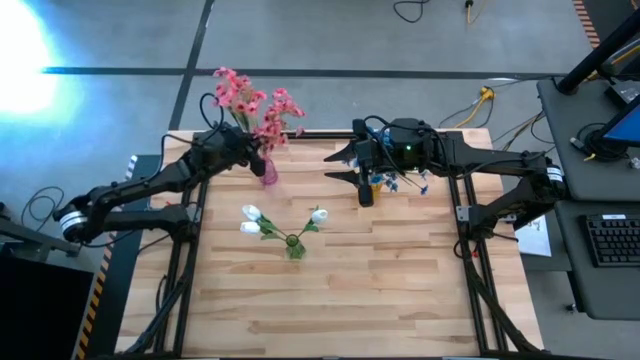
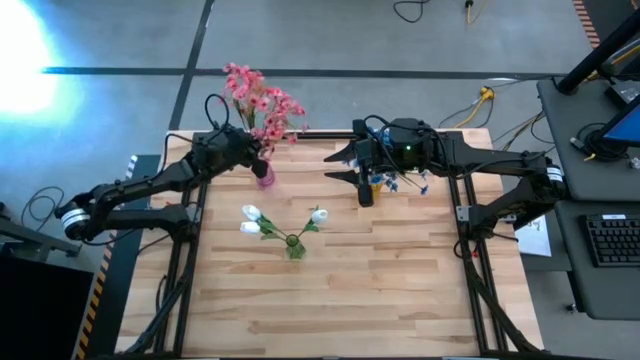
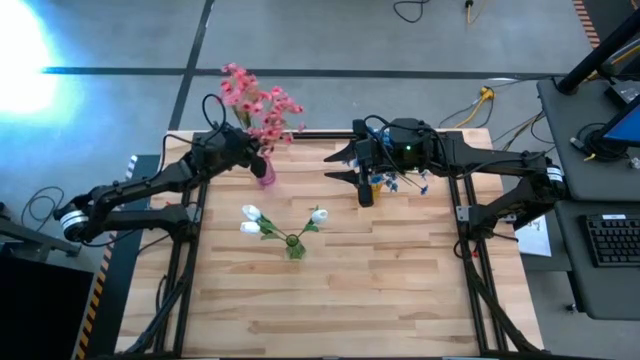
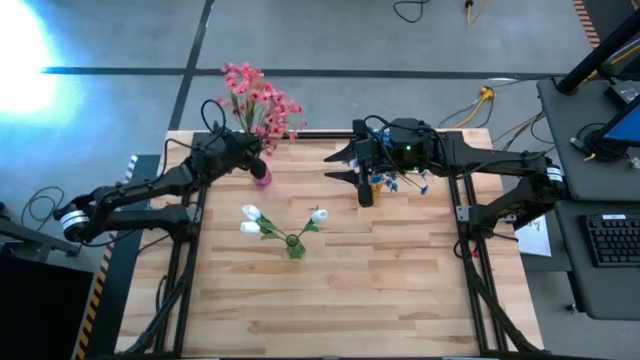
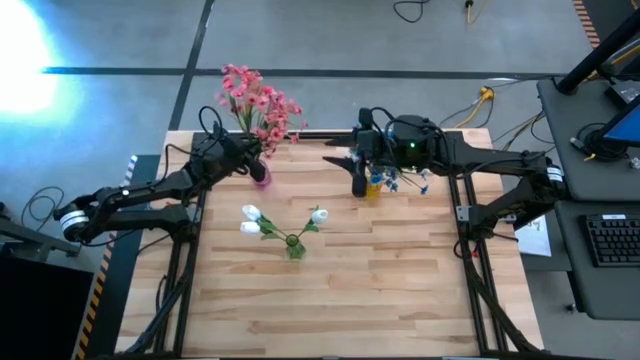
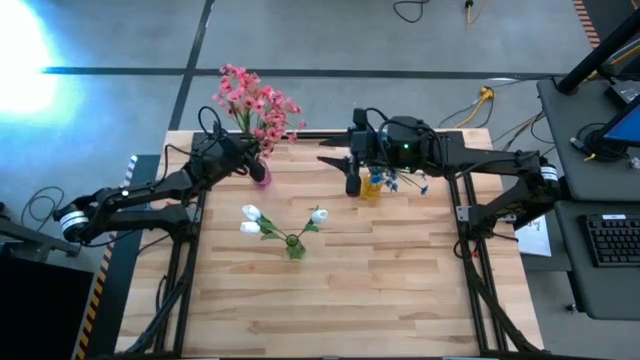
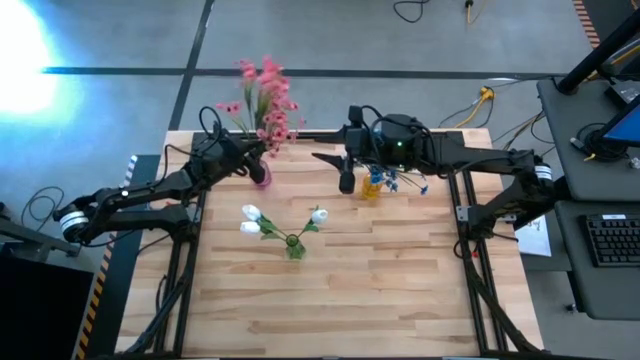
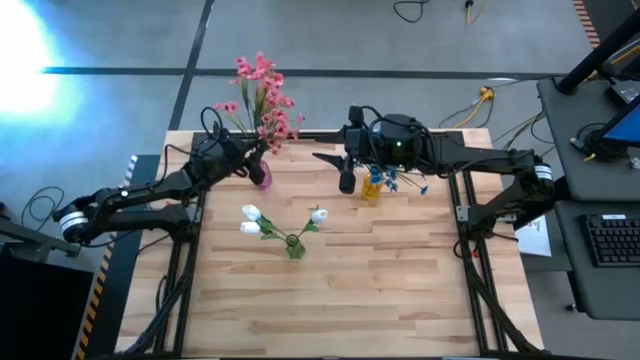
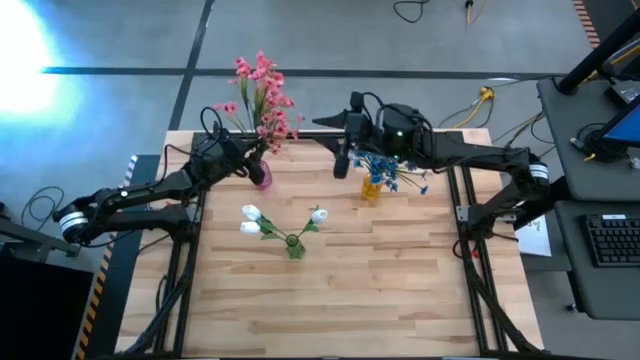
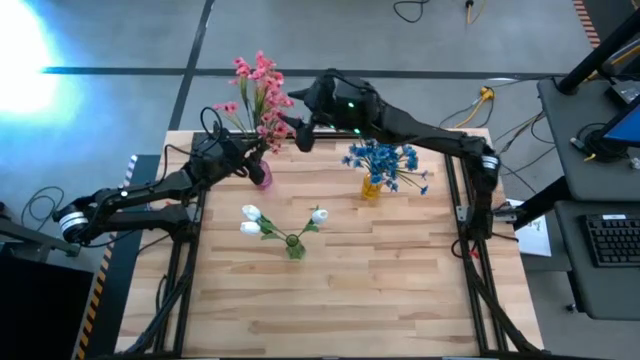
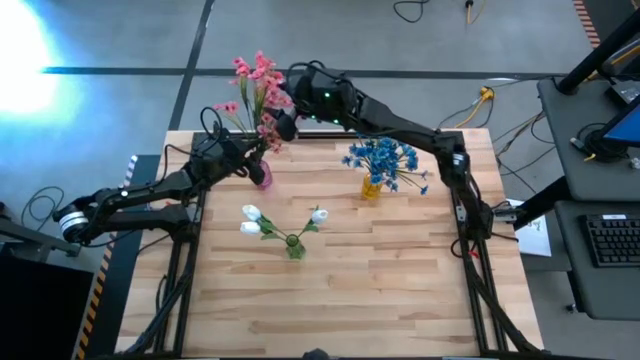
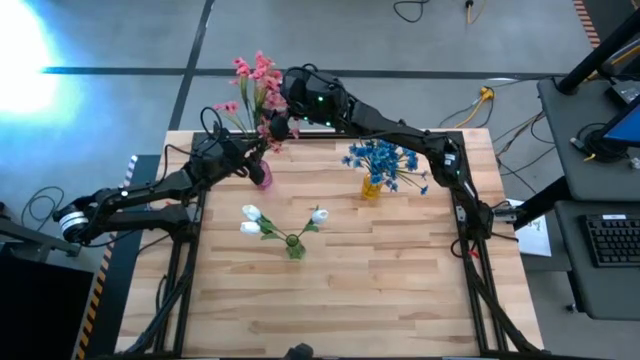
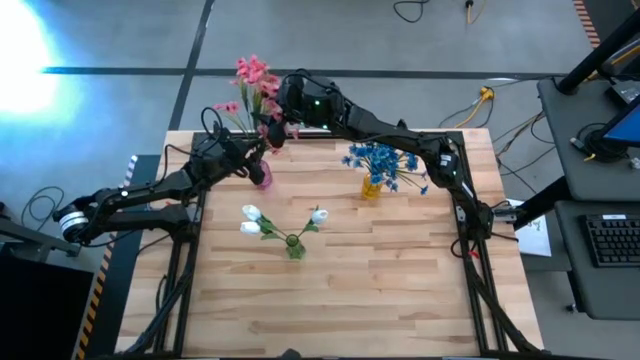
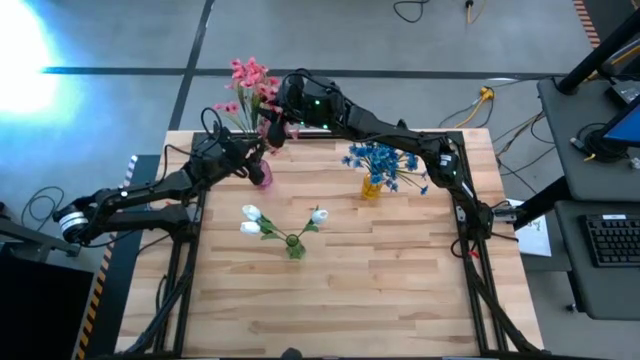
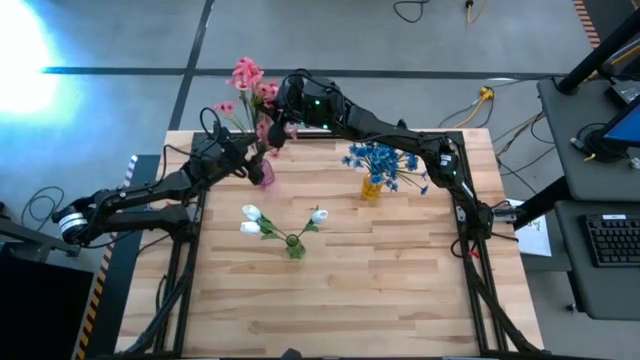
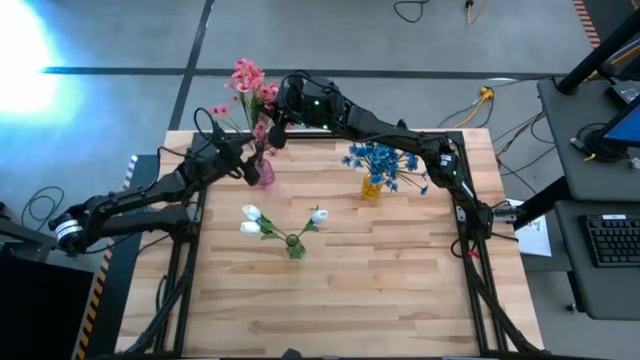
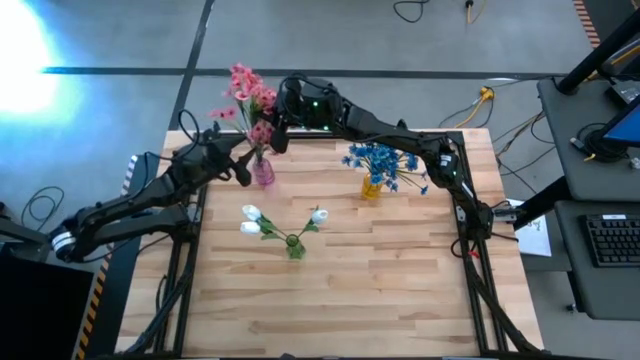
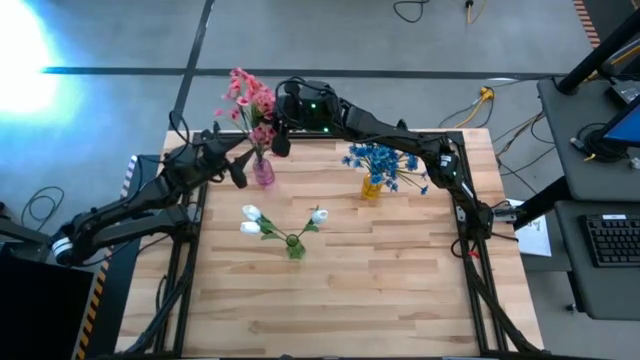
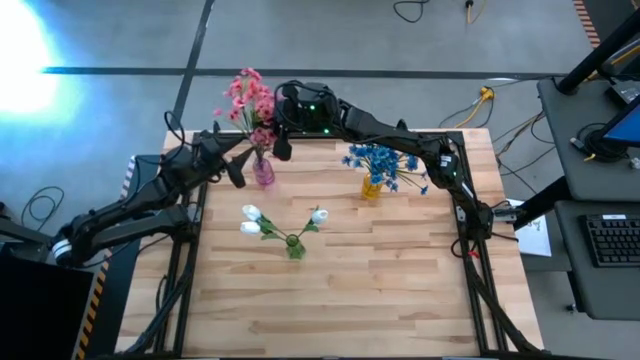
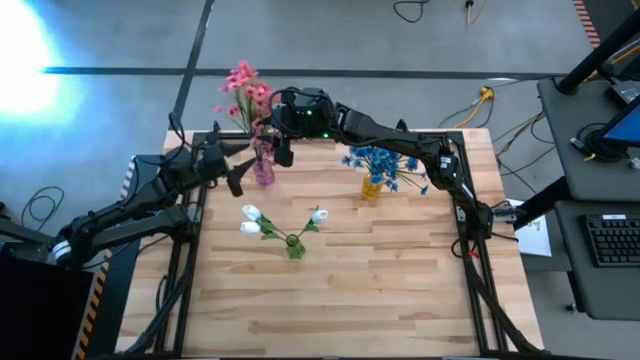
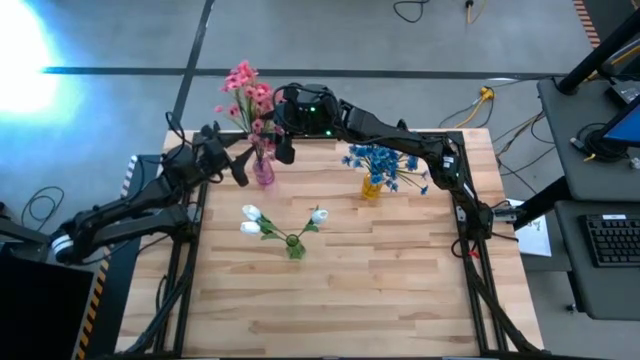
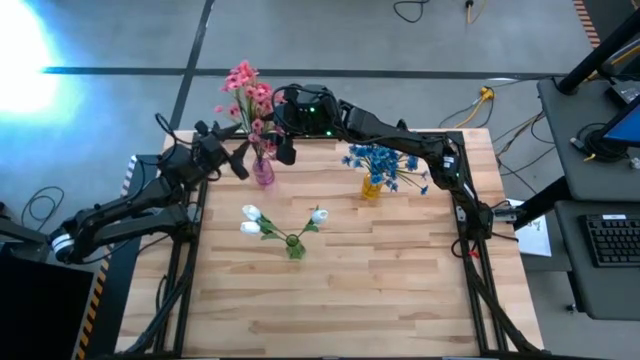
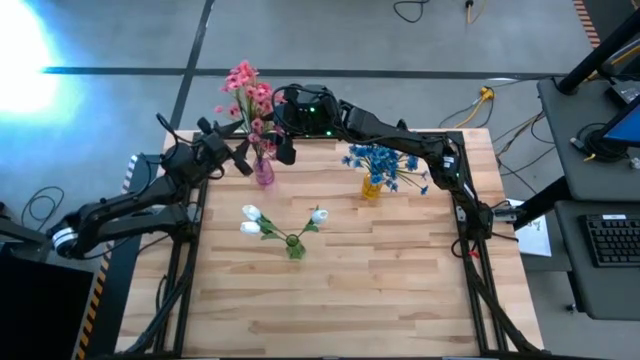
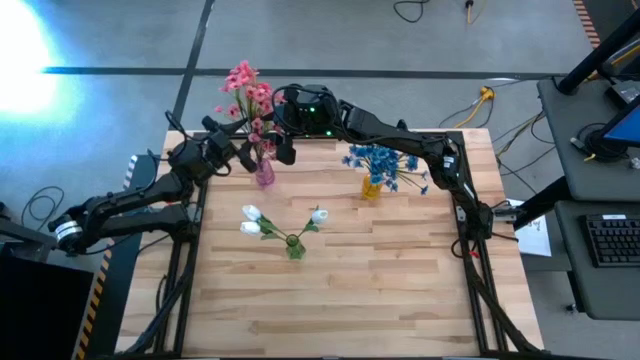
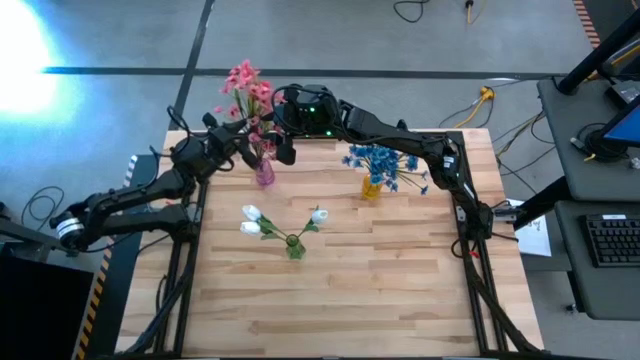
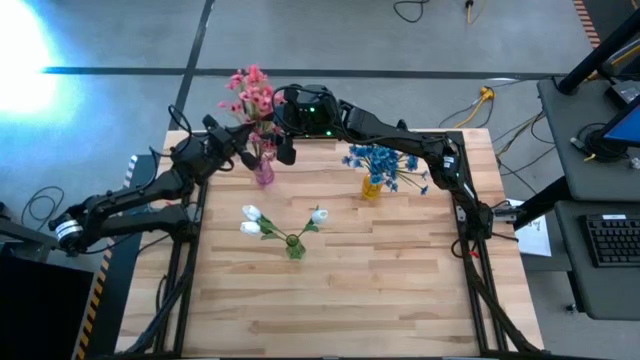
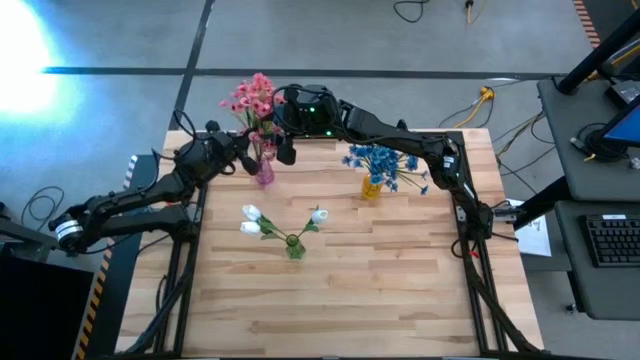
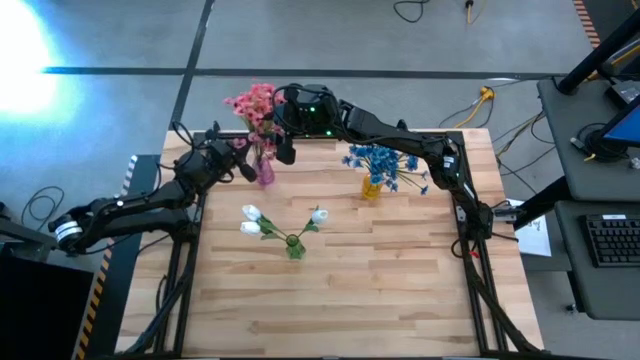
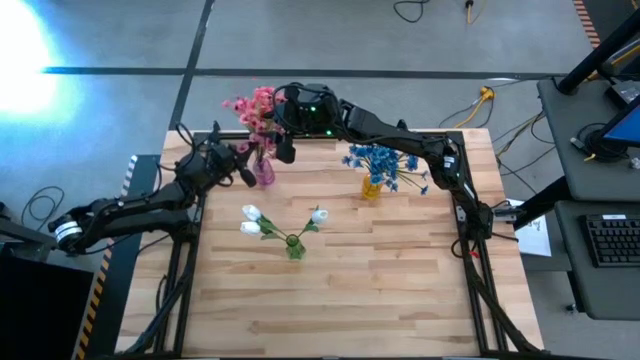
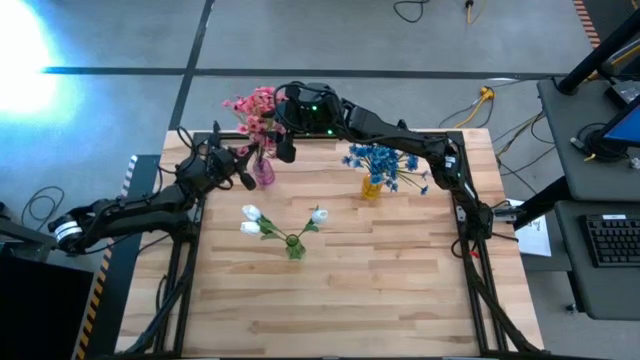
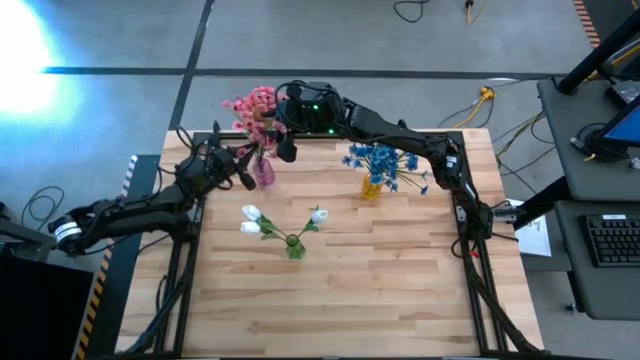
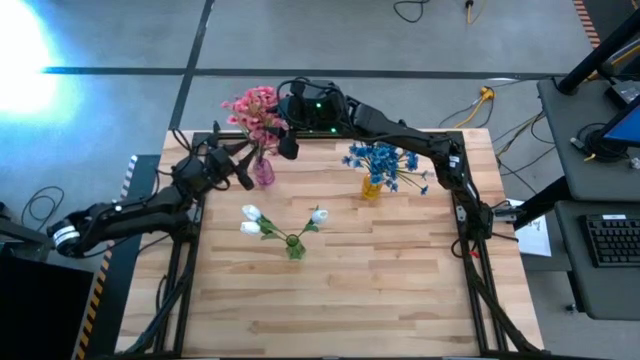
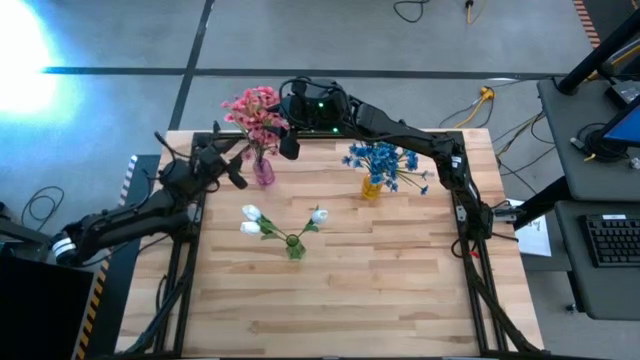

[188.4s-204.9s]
Task: Sort flowers into vase by color
Put the pink flowers into the pink vase

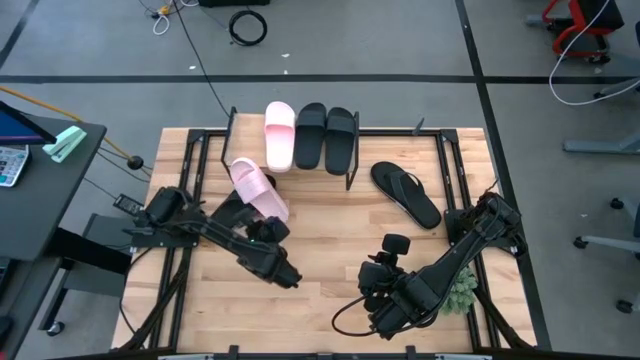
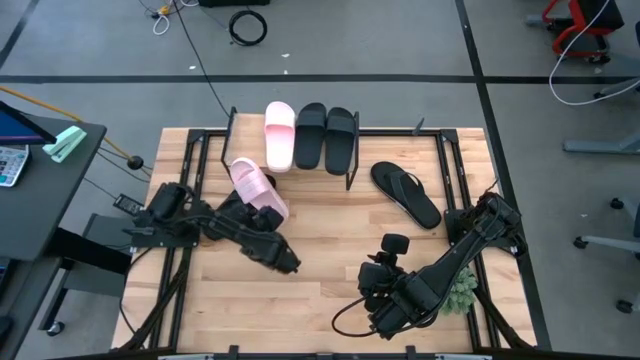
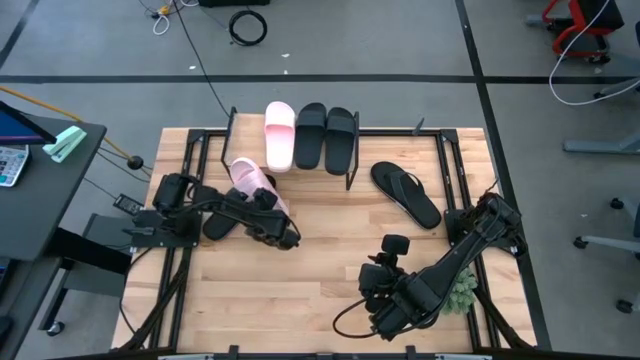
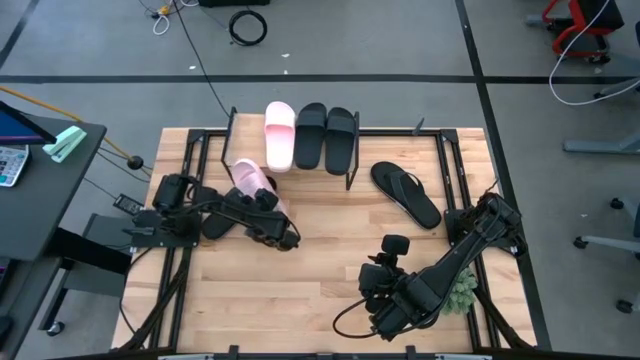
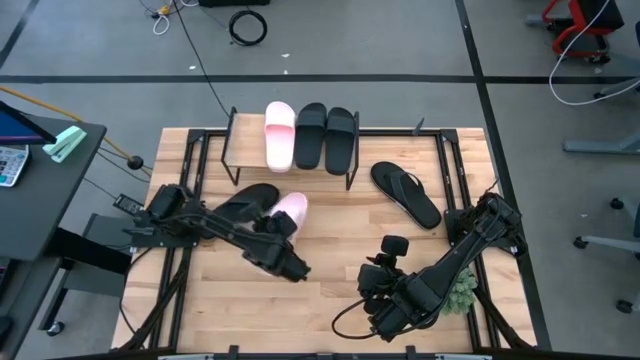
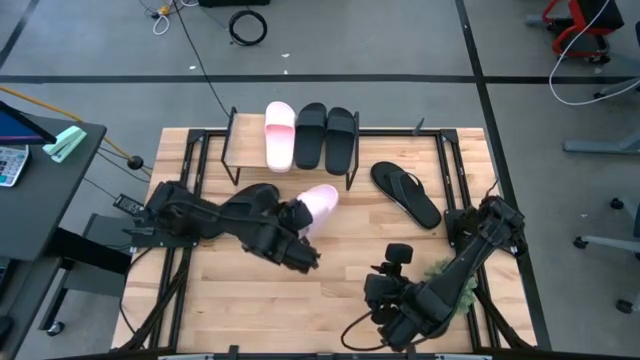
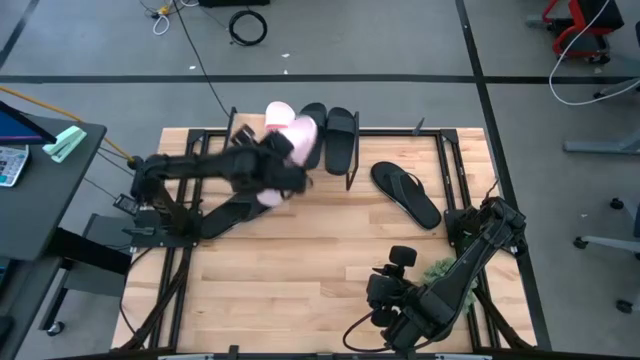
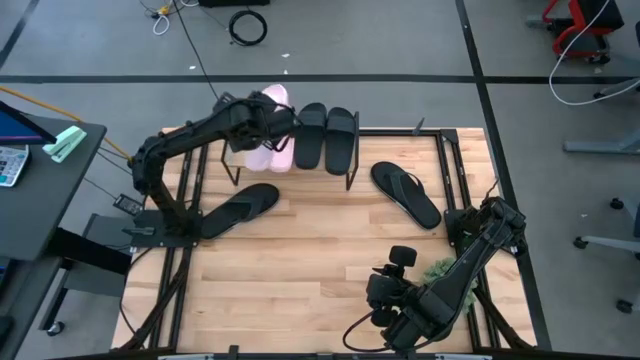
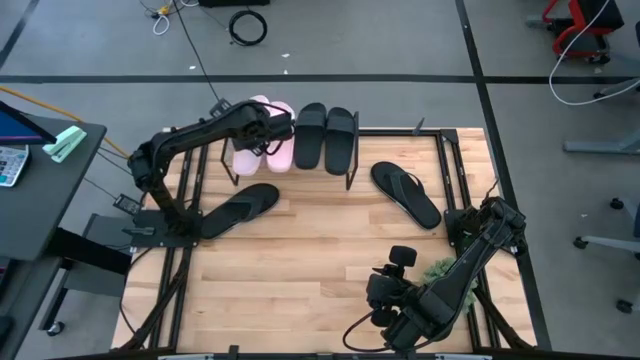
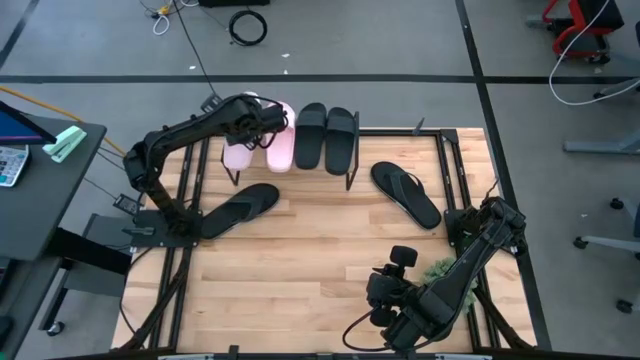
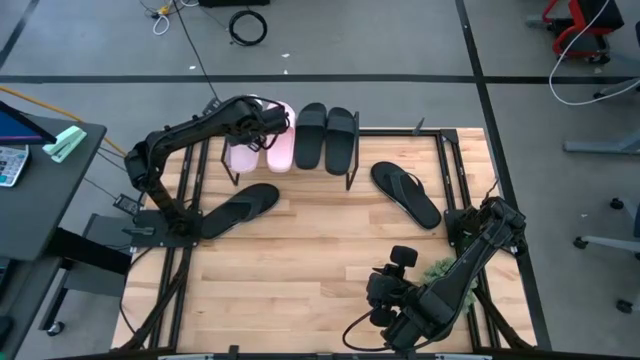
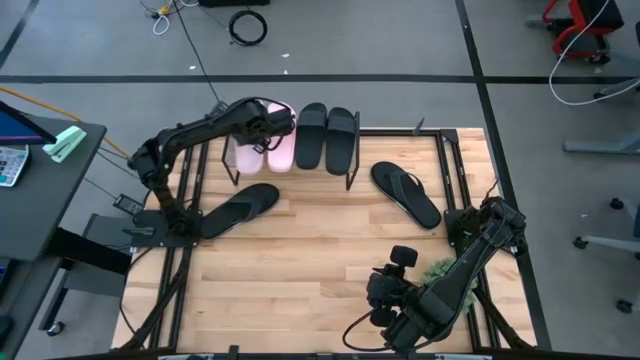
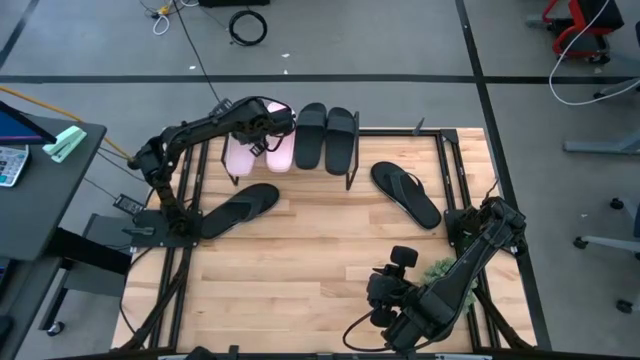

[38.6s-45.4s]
Task: Pick and place slides into the shelf
Put the pink slipper on the shelf
